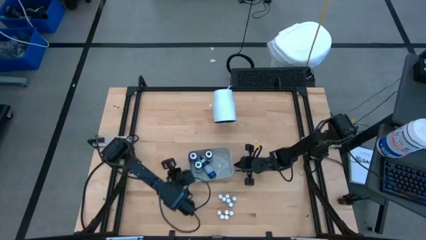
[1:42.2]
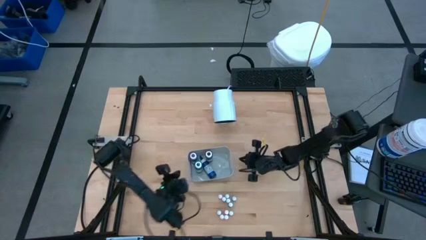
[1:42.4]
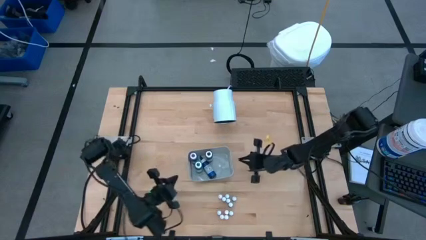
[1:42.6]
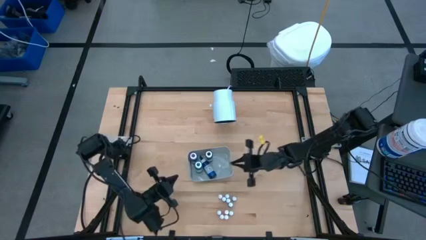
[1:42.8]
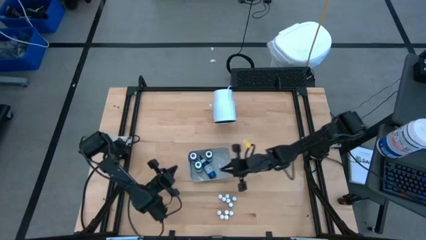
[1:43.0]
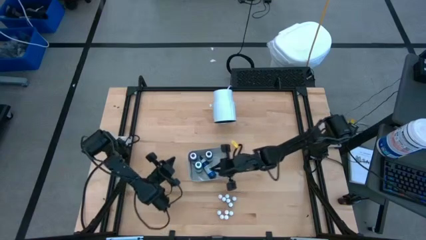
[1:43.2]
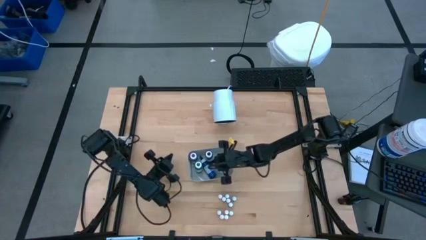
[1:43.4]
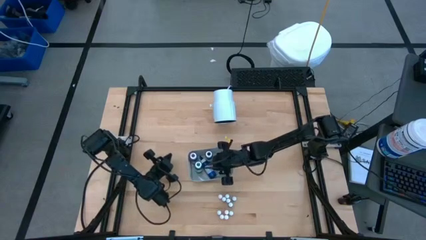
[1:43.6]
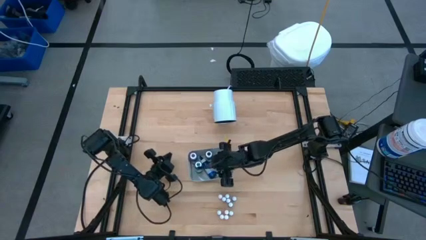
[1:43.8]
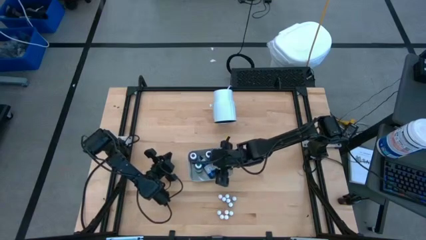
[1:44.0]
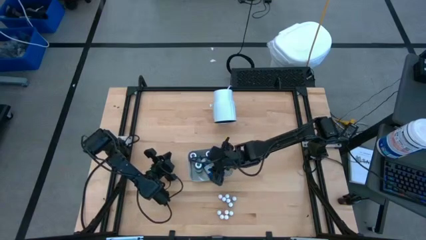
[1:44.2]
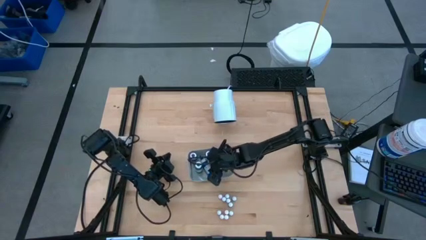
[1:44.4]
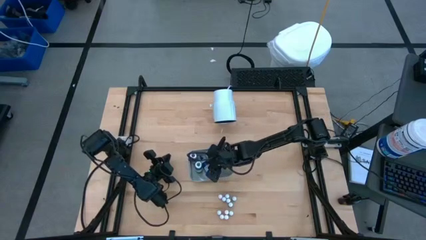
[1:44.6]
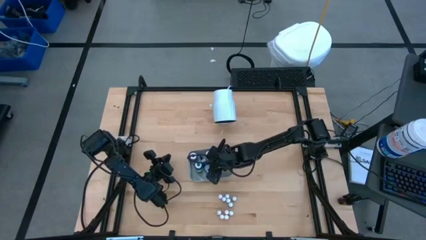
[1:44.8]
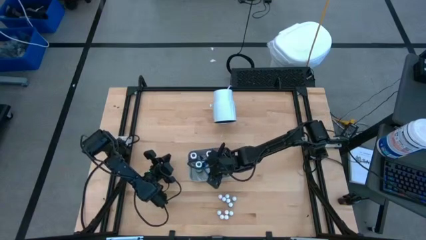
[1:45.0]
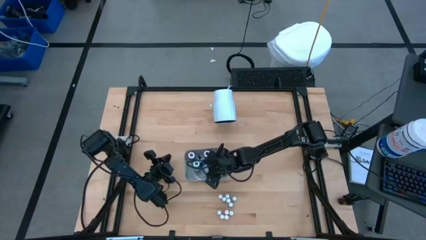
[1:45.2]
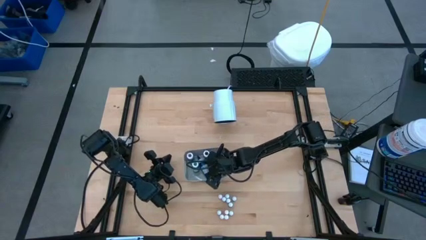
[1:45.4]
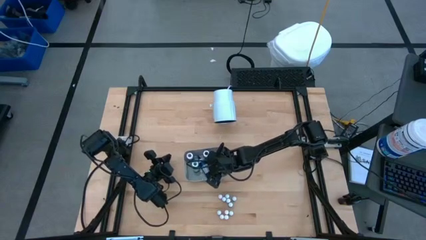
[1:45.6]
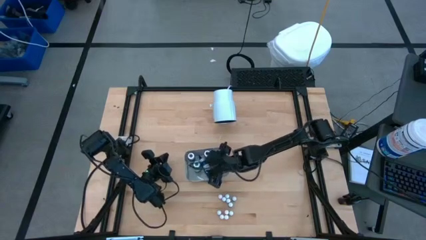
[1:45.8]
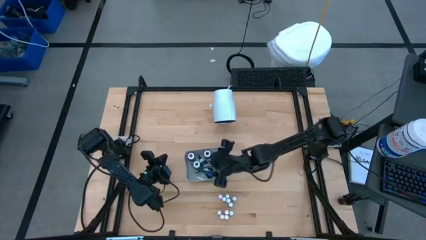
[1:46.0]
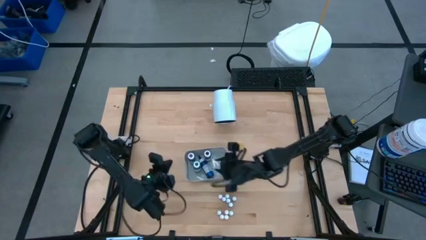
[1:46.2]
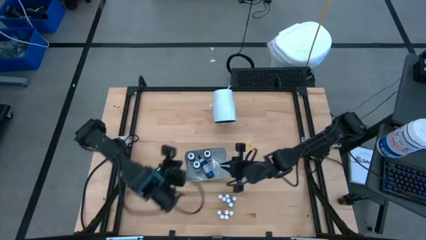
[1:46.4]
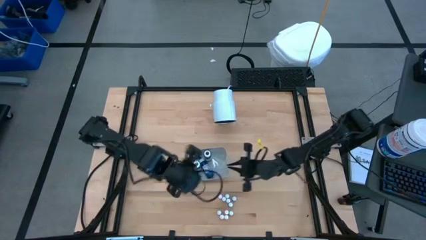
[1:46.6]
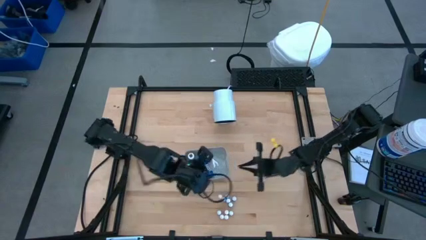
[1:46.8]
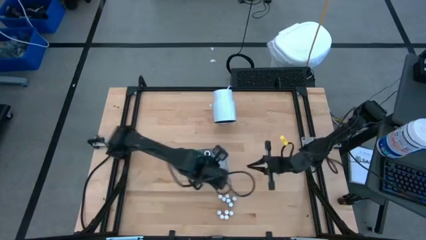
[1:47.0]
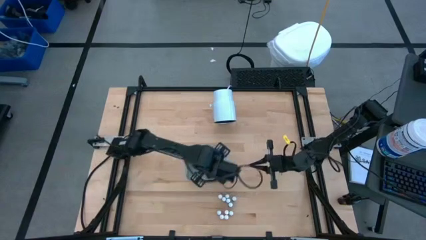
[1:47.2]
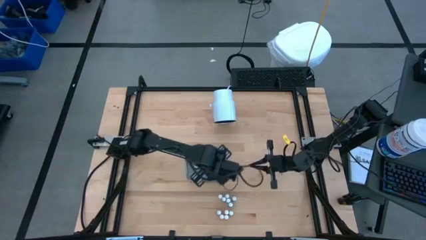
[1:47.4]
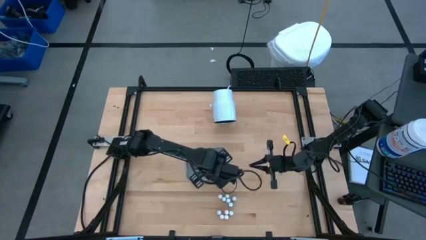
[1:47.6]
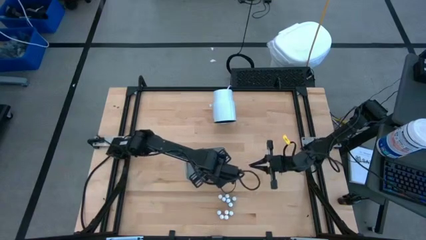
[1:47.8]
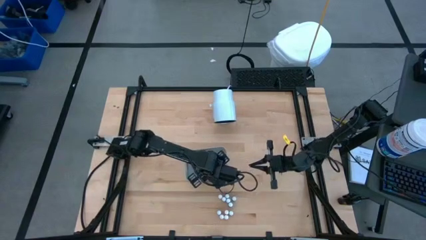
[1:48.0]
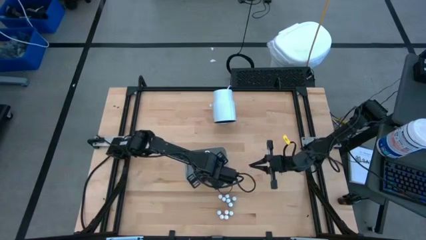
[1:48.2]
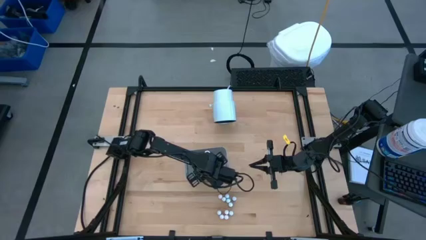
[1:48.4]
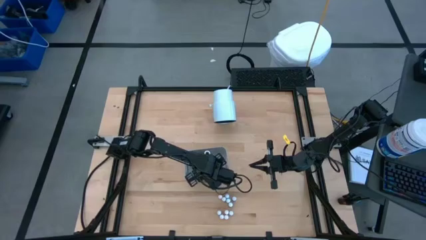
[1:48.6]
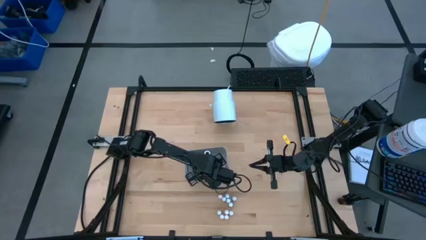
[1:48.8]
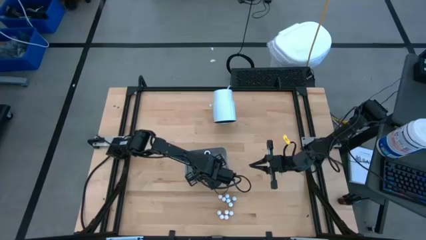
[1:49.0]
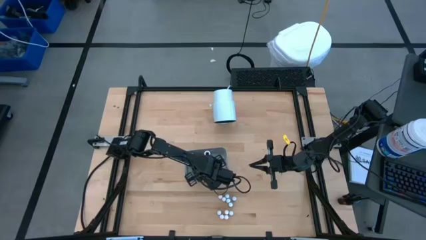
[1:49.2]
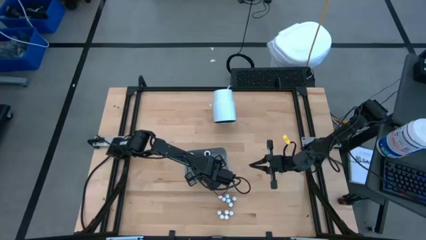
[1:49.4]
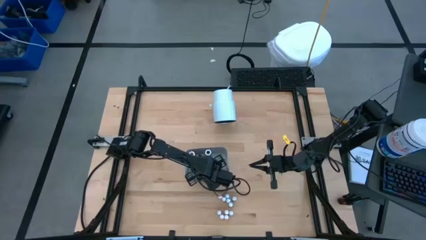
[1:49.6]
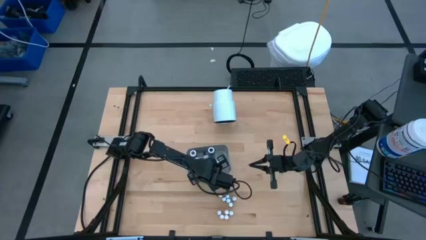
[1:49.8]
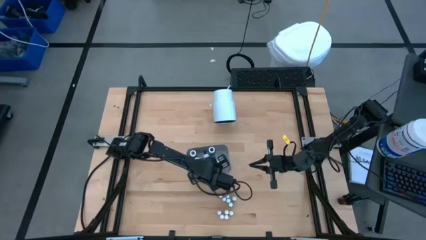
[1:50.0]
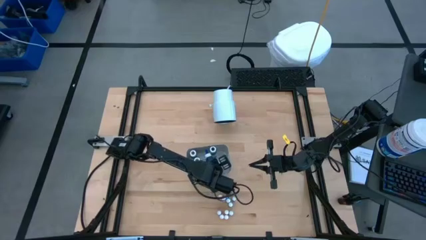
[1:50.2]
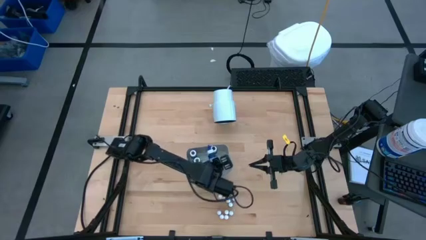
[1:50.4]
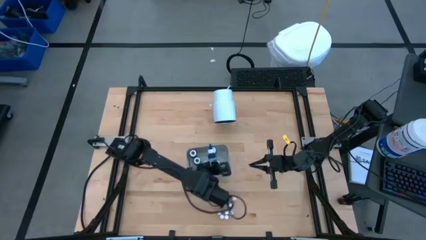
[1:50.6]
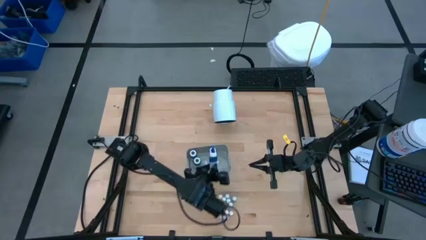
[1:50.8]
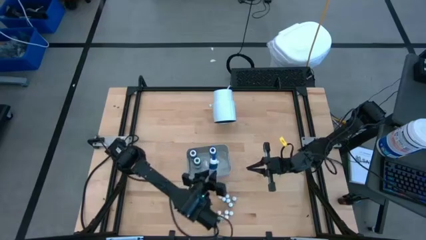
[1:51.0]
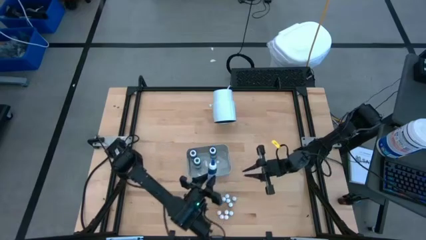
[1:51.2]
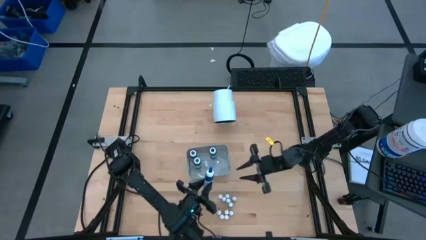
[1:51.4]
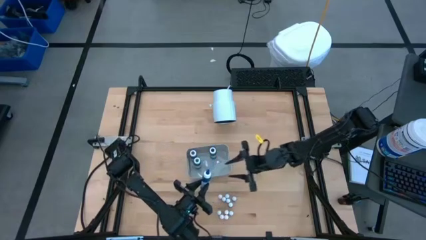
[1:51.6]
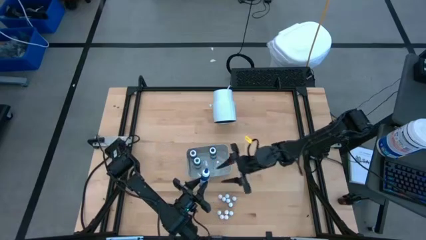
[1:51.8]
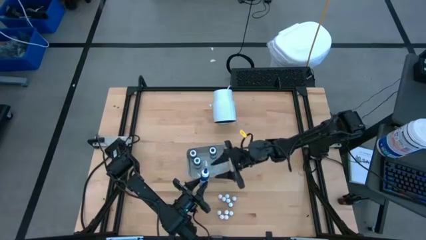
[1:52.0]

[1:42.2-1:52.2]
Task: Pick & Place food coloring
Adjust the large blue food coloring bottle on the gray bin

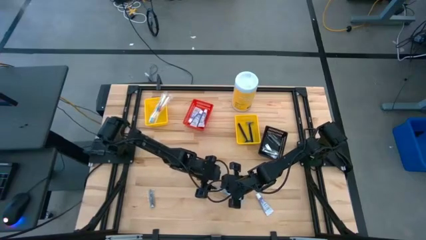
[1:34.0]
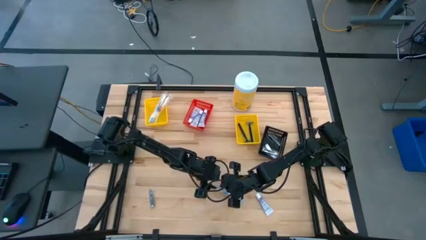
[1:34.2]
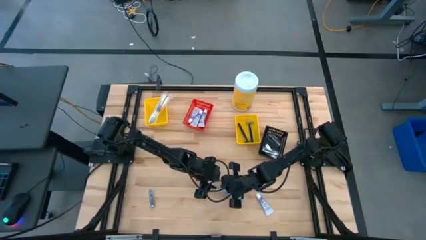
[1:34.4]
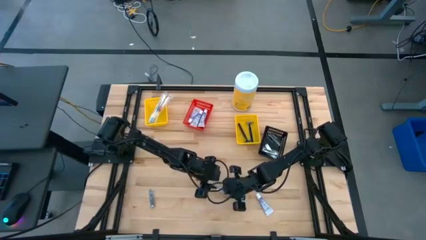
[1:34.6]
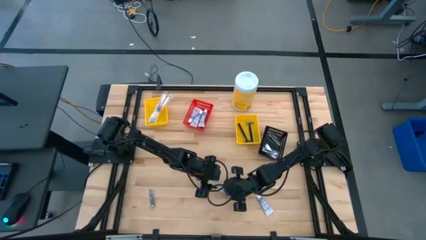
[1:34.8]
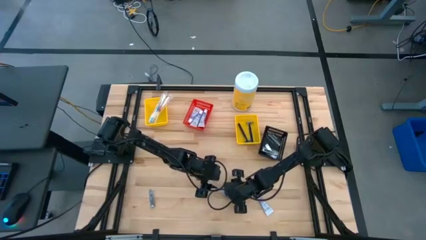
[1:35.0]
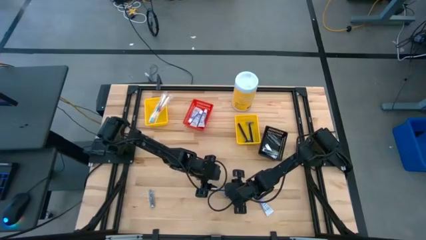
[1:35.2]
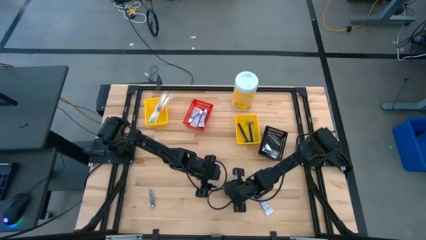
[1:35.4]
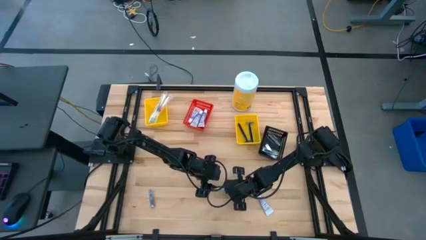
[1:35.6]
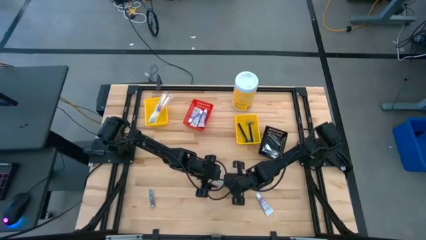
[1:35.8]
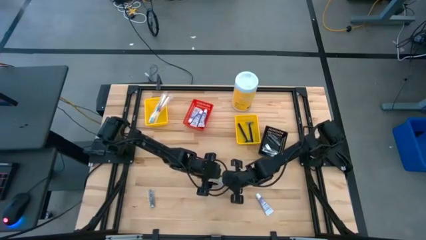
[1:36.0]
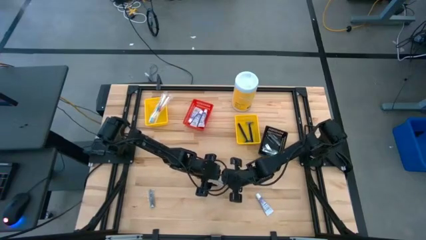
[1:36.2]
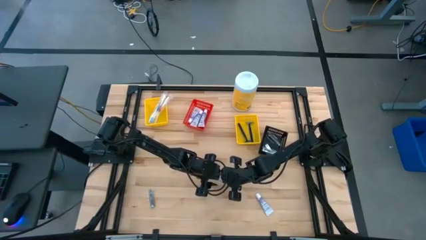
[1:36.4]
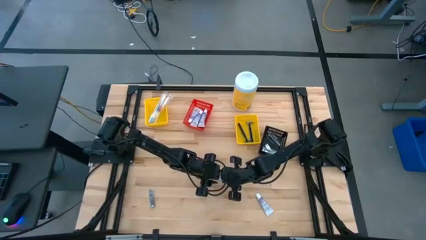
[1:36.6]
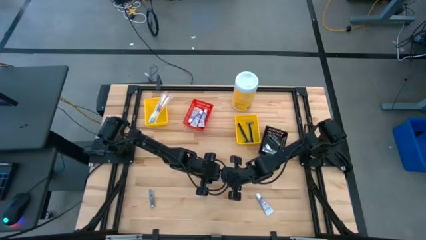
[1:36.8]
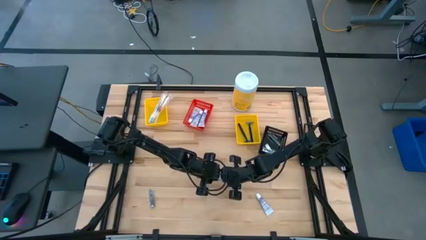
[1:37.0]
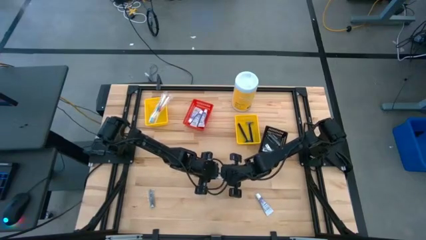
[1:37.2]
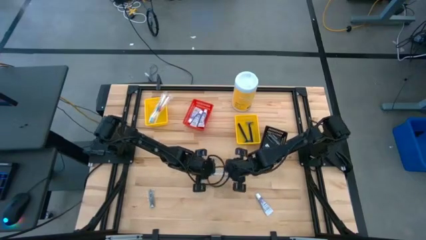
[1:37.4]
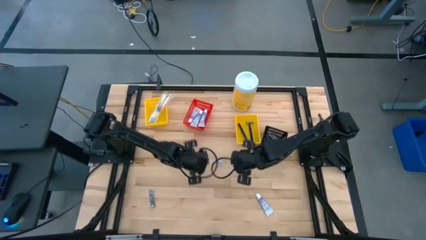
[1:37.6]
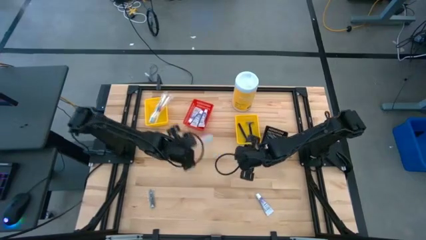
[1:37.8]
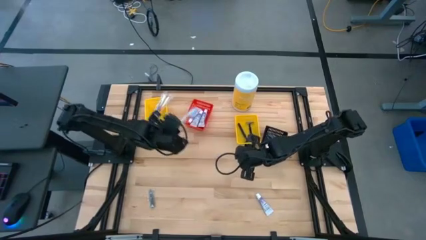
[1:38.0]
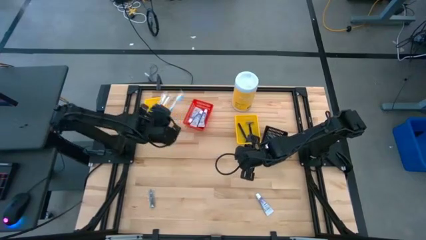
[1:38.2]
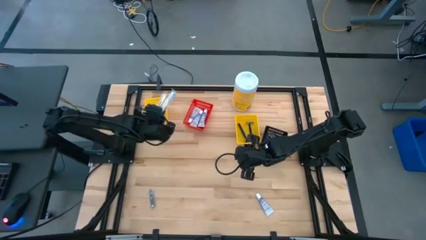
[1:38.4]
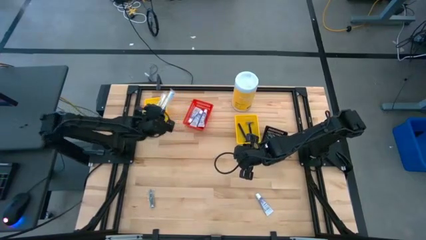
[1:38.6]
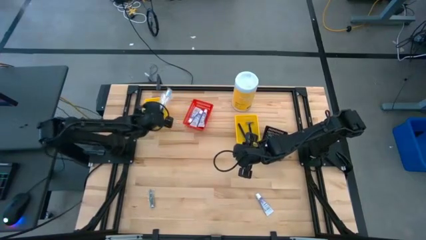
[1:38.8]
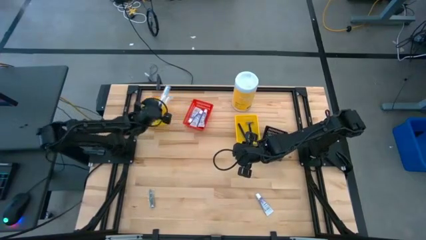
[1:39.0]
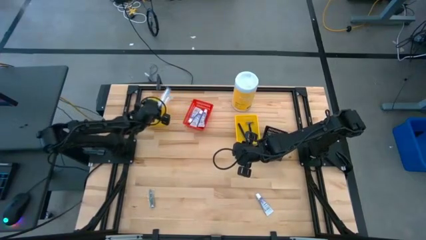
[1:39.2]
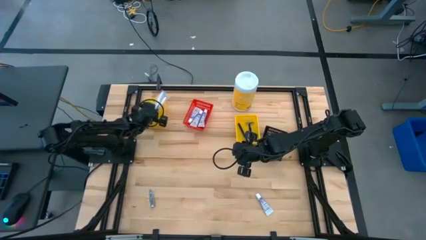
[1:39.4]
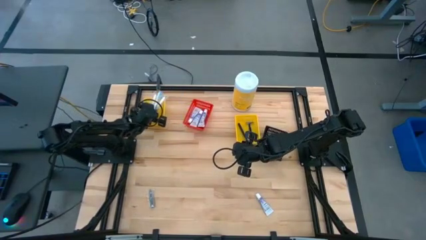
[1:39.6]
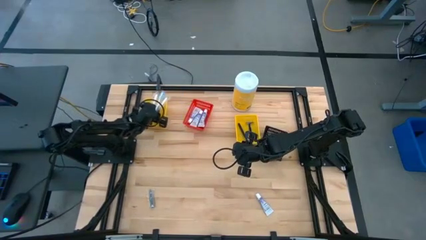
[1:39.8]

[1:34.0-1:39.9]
Task: Pick & Place Travel size toiletries
Put the blue toothbrush into the left yellow basket
